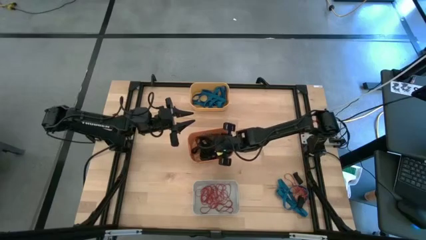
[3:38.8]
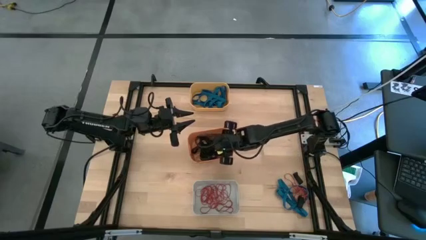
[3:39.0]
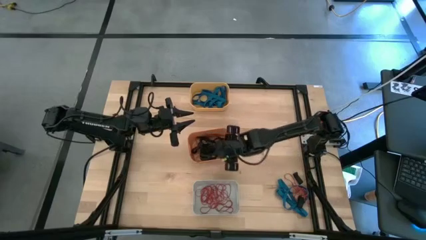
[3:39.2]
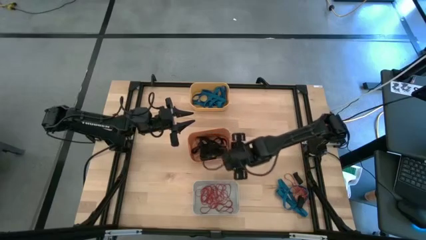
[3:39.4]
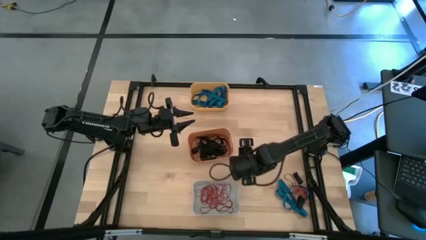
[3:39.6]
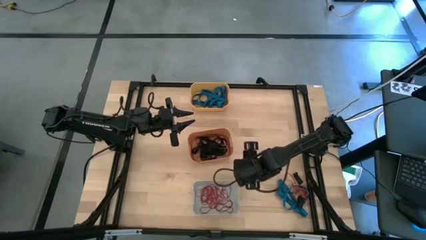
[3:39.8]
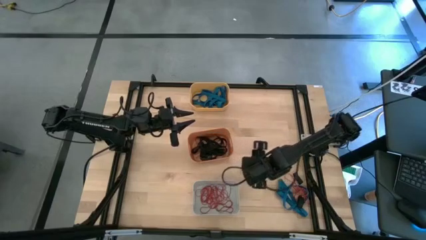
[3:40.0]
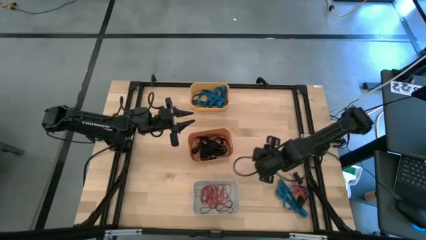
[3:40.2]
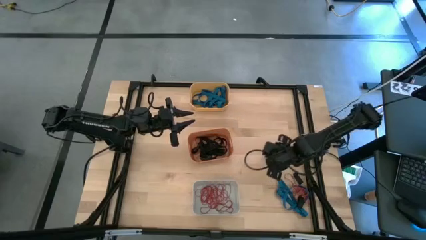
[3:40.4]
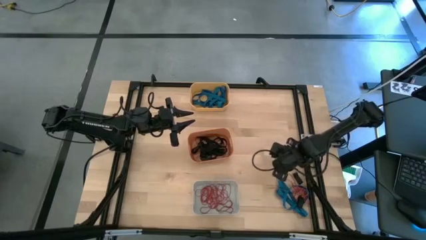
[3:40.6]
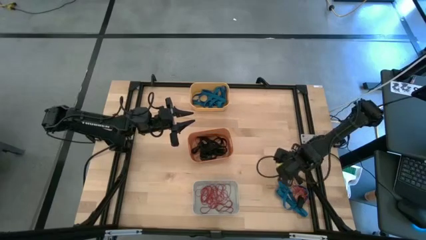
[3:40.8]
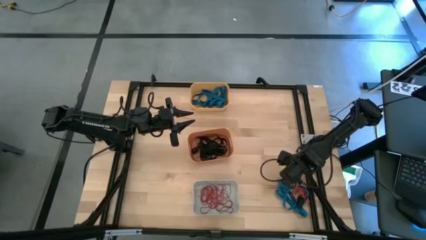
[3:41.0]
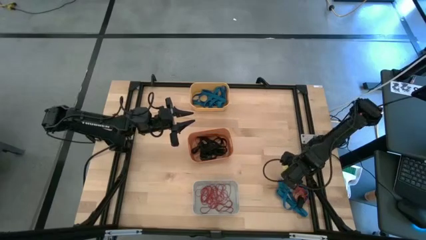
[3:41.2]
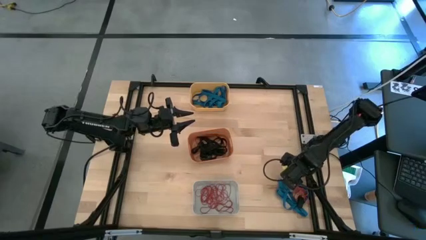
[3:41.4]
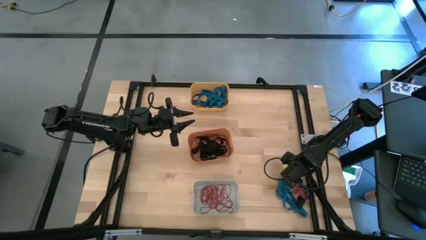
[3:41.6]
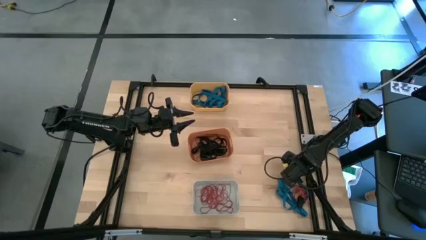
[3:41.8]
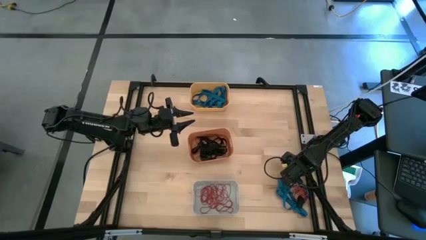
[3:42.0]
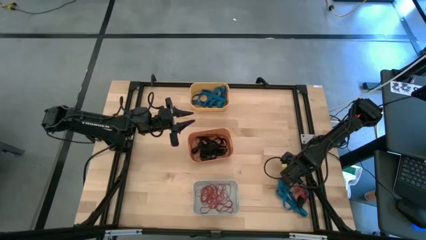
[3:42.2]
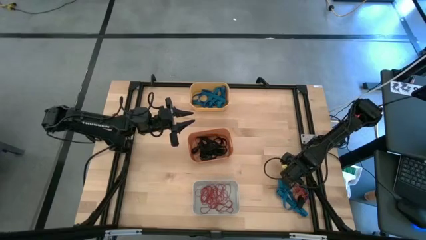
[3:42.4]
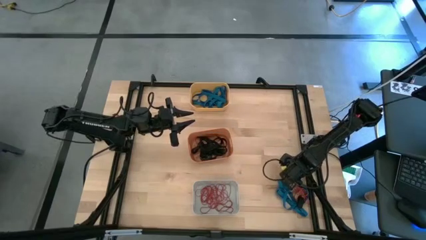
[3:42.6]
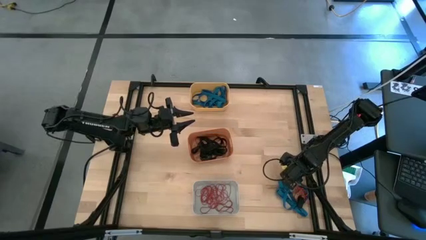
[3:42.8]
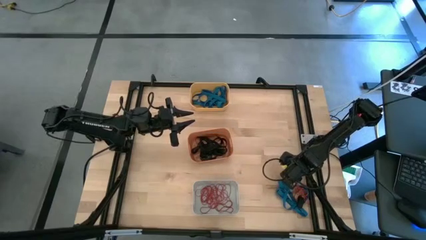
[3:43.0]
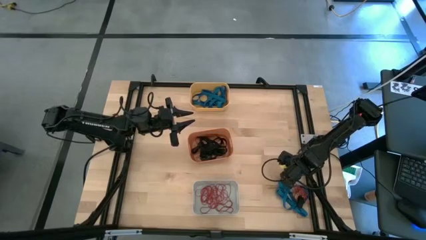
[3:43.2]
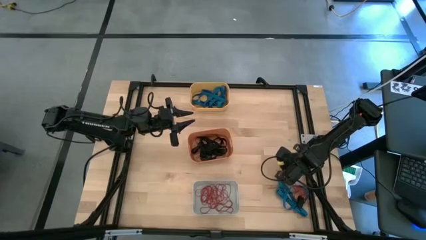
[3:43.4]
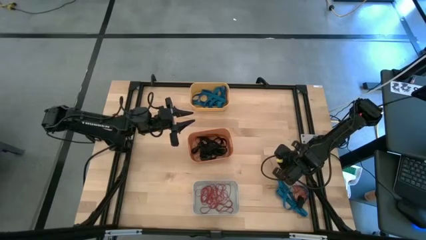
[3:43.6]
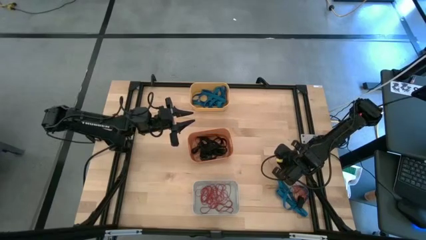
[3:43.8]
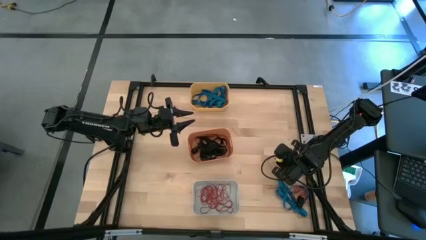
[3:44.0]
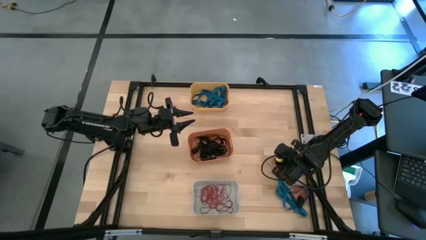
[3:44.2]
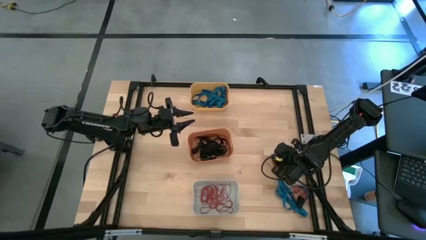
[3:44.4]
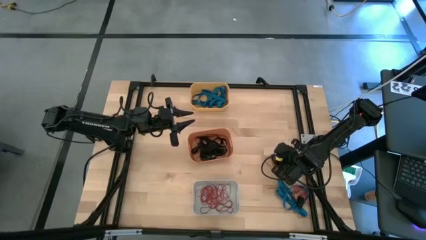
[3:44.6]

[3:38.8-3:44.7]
Task: Sort rubber bands into baskets
Put the black rubber band in the orange bin

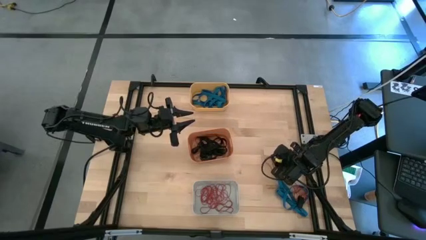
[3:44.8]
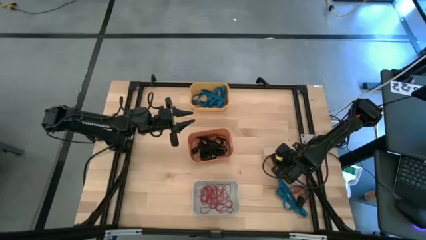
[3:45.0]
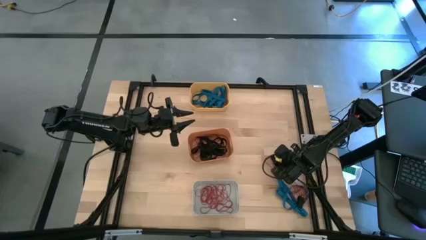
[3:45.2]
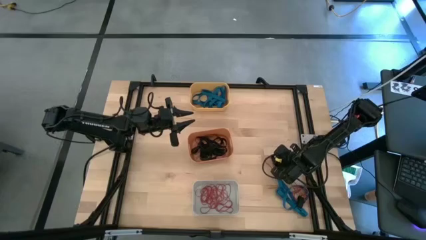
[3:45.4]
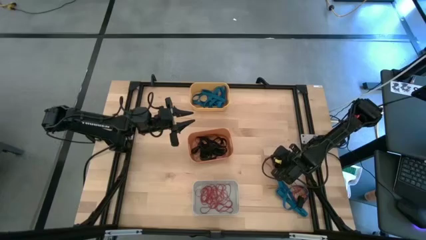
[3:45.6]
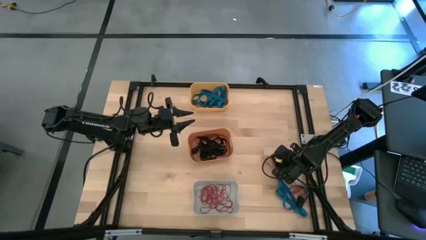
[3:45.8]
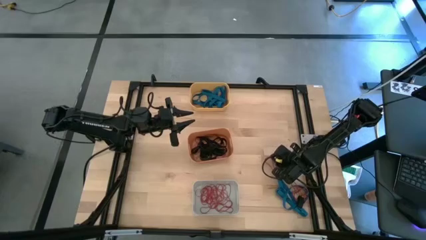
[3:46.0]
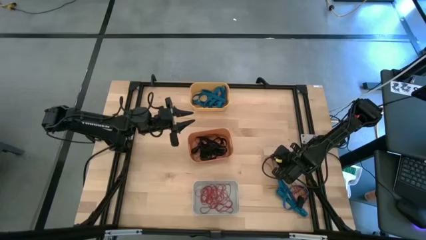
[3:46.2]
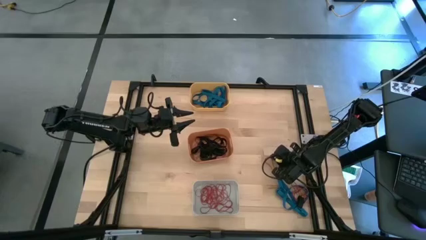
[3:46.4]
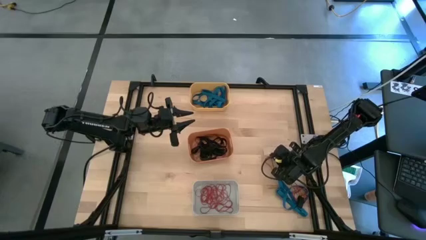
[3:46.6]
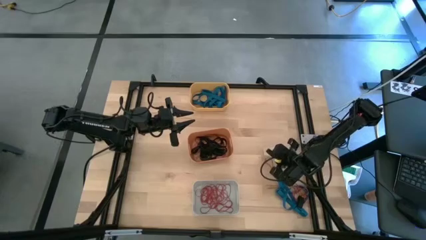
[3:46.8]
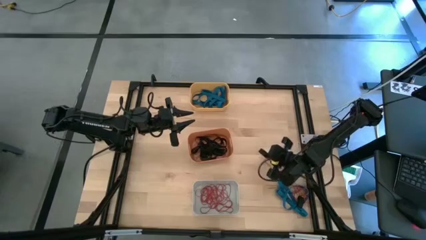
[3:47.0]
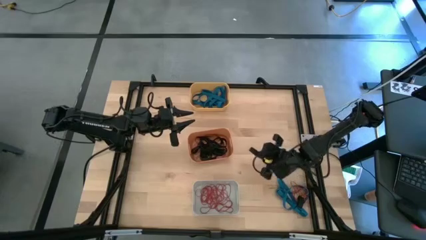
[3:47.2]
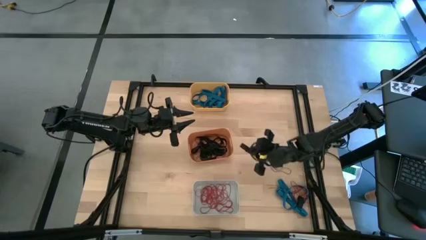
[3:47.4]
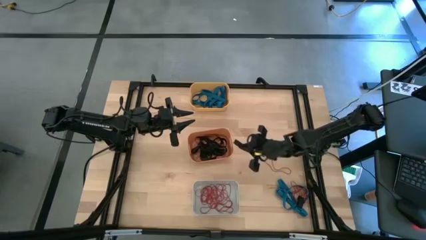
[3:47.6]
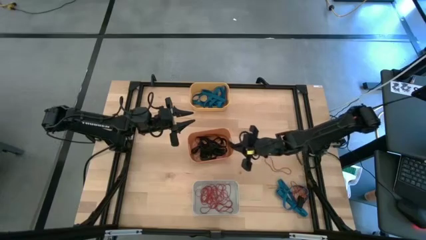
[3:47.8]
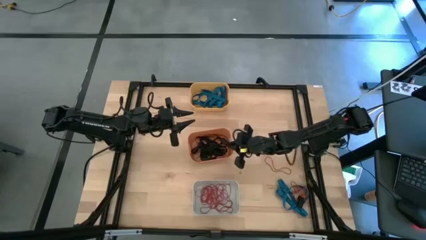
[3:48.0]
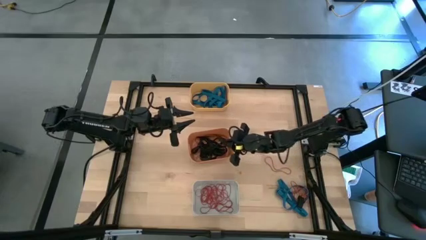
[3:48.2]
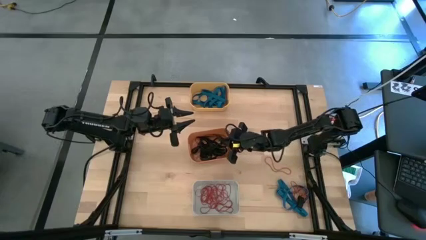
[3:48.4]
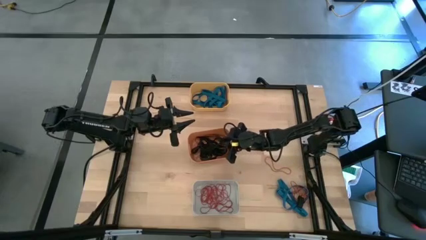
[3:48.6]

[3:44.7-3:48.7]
Put the black rubber band in the orange bin

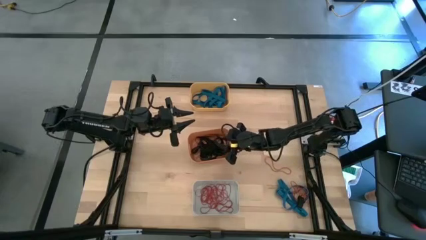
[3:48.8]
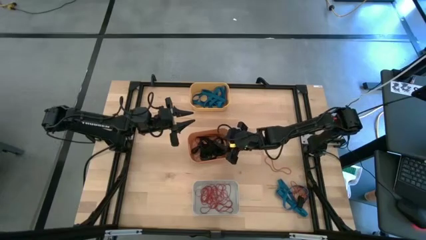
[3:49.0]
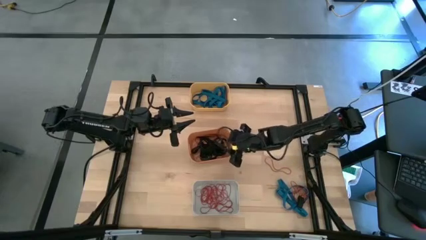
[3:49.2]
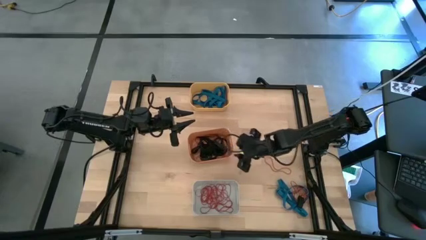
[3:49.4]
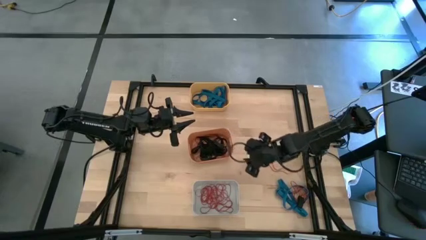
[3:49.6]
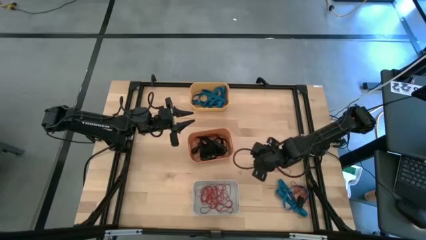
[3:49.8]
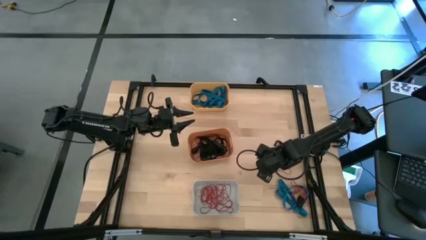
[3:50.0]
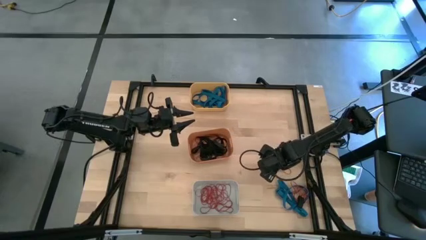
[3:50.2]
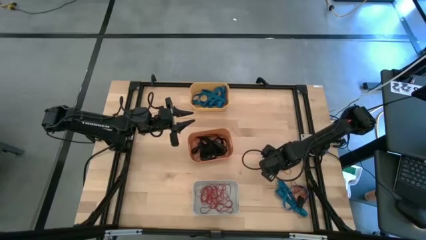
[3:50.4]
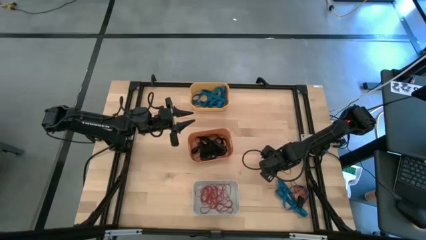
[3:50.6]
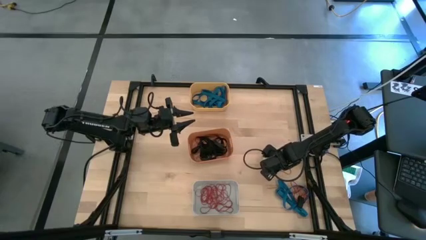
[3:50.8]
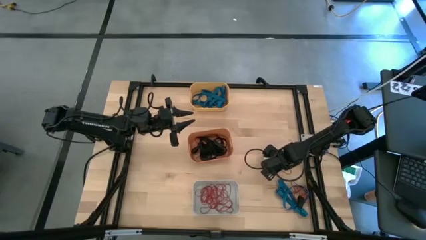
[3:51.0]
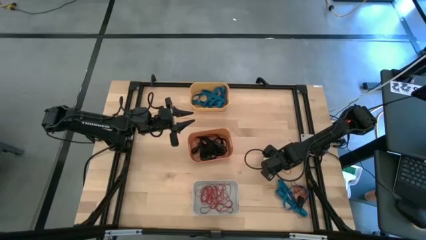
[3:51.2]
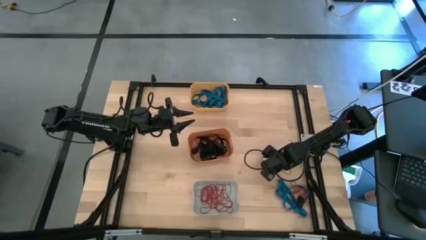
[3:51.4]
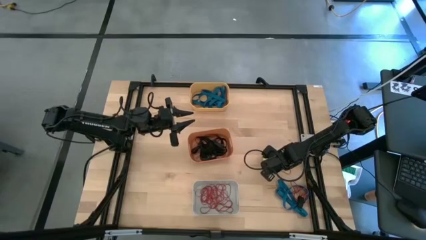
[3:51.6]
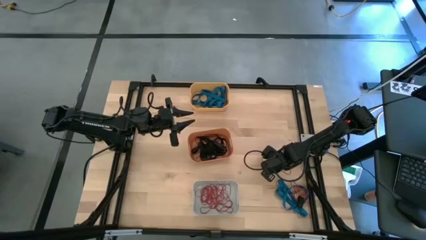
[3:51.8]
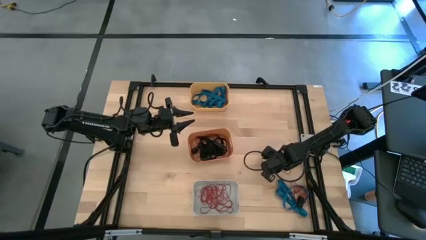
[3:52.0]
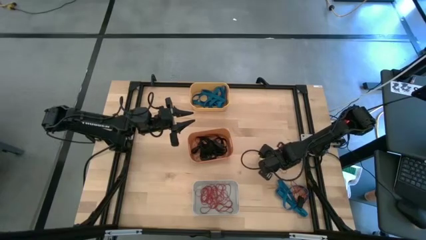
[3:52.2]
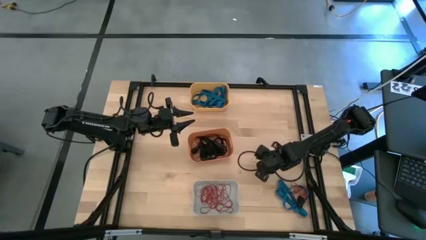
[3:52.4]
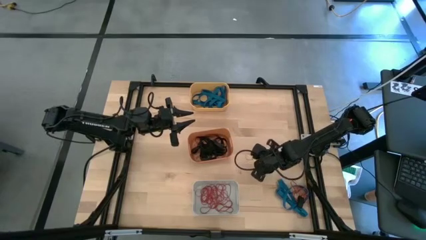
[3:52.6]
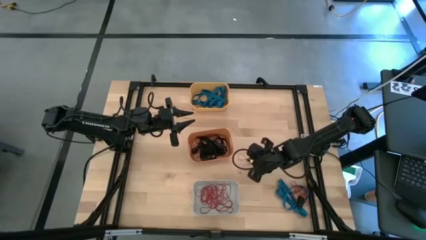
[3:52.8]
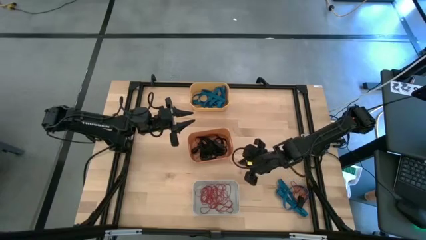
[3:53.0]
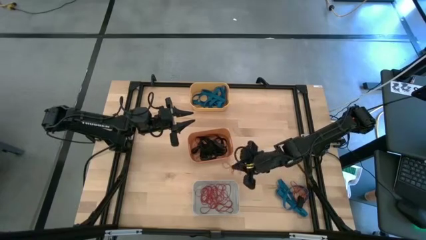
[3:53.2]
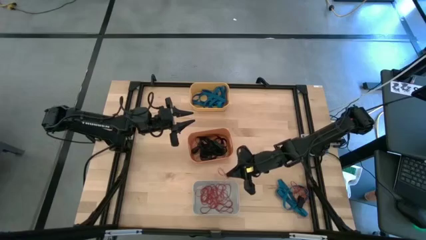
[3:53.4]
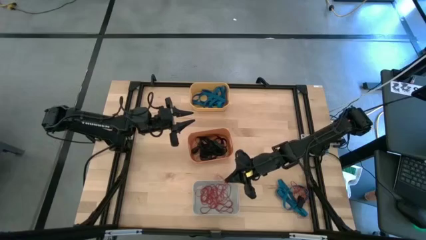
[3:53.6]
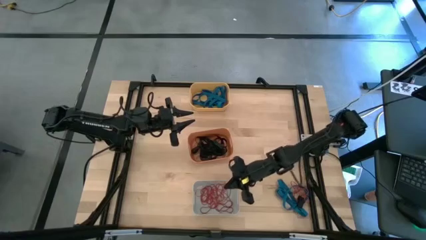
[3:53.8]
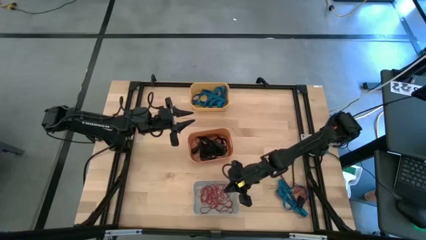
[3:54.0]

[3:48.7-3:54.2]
Put the red rubber band in the white bin
